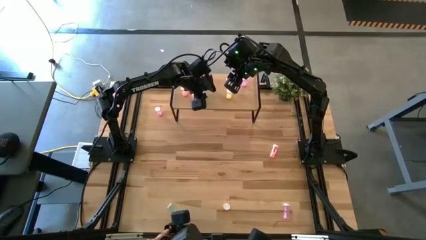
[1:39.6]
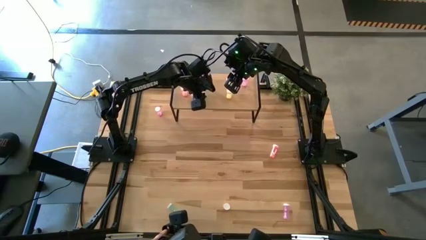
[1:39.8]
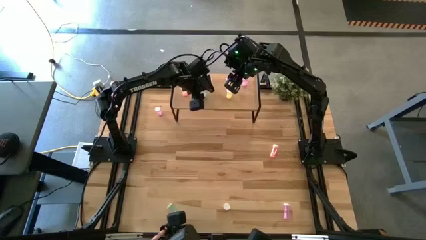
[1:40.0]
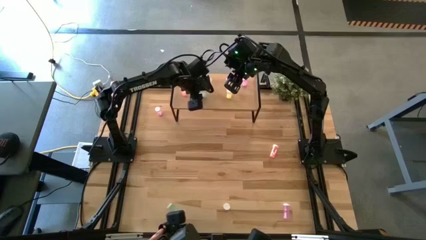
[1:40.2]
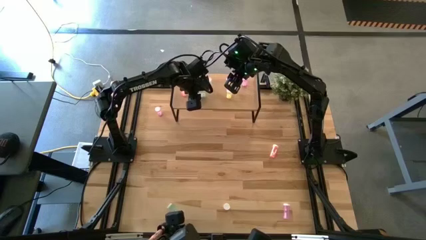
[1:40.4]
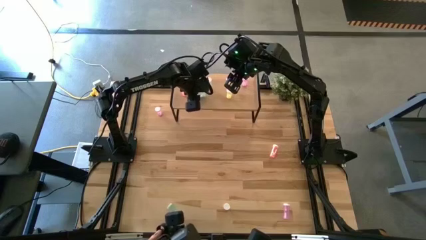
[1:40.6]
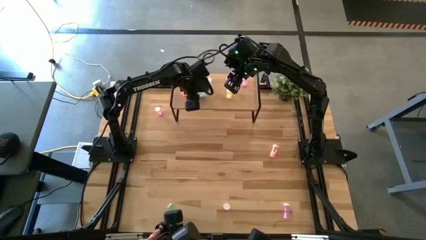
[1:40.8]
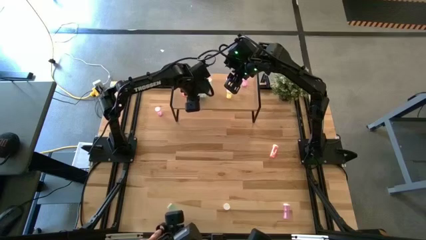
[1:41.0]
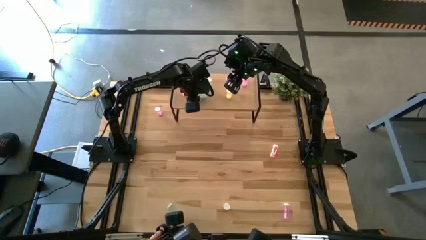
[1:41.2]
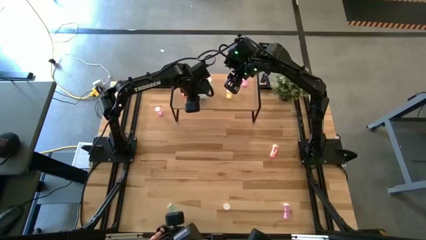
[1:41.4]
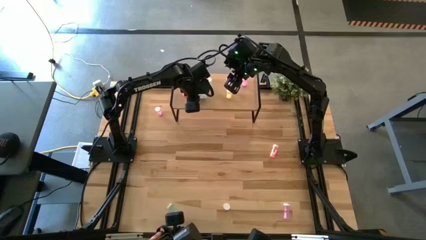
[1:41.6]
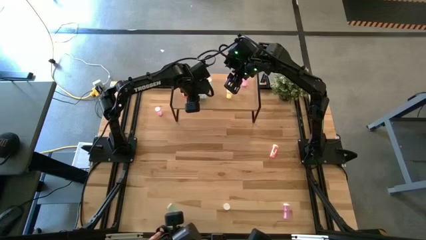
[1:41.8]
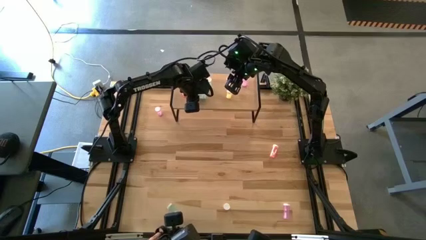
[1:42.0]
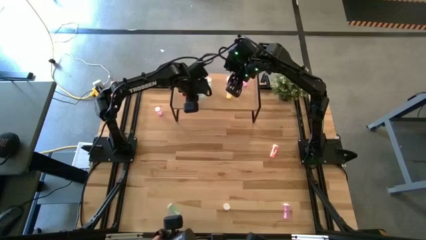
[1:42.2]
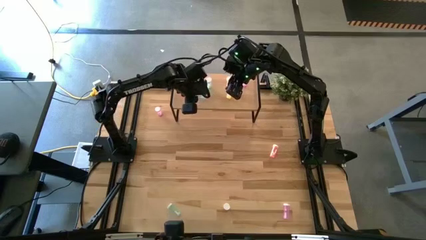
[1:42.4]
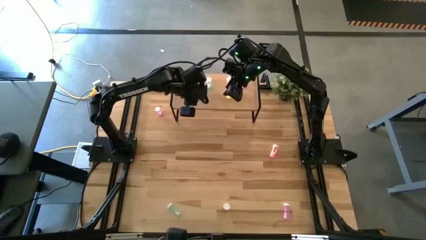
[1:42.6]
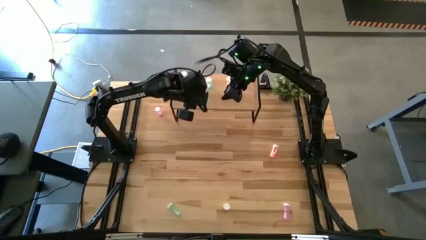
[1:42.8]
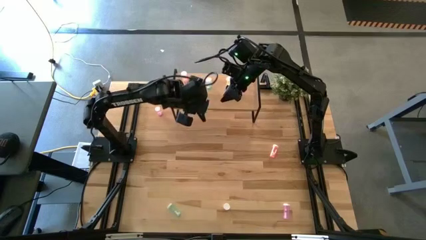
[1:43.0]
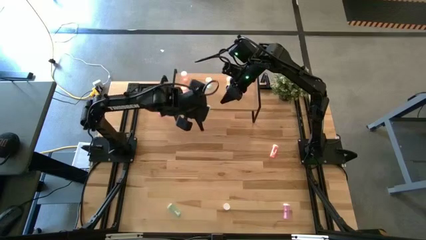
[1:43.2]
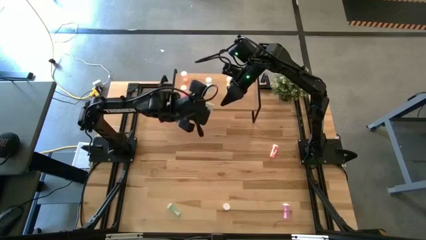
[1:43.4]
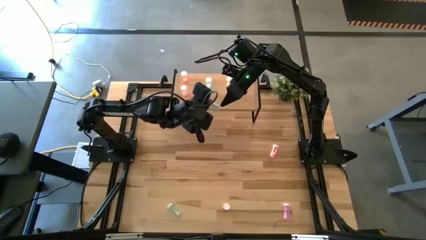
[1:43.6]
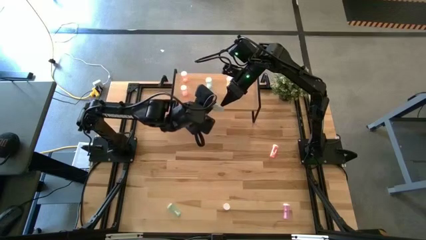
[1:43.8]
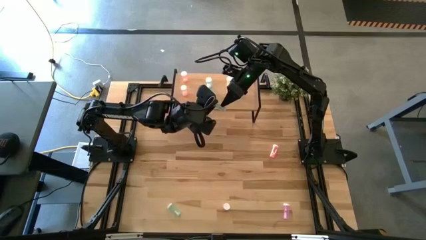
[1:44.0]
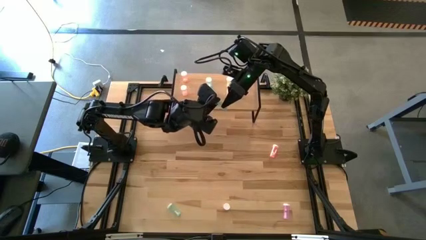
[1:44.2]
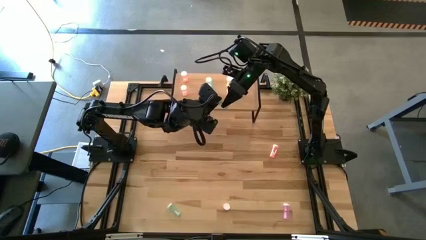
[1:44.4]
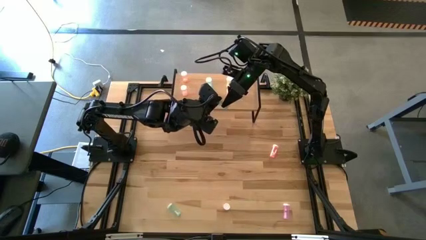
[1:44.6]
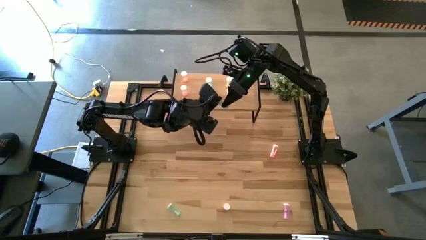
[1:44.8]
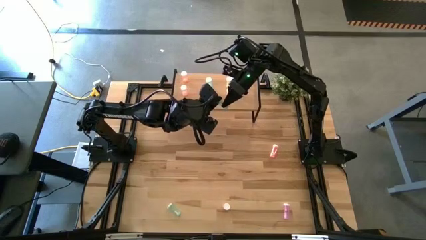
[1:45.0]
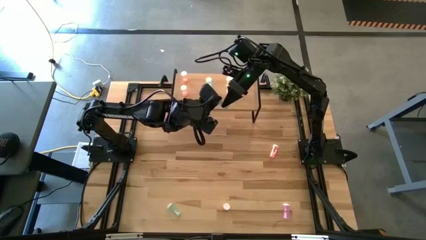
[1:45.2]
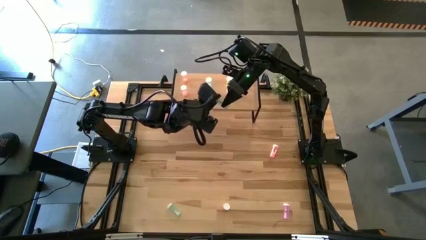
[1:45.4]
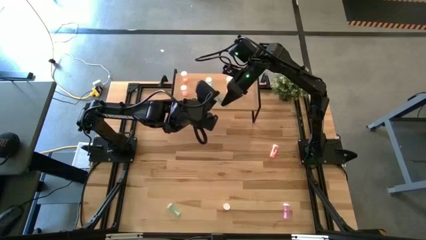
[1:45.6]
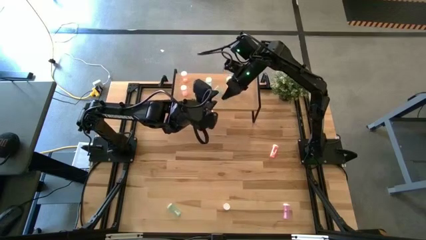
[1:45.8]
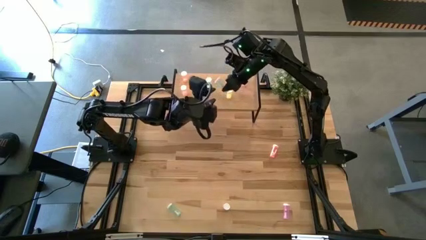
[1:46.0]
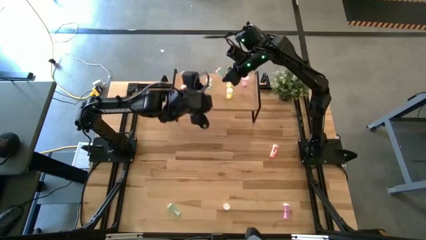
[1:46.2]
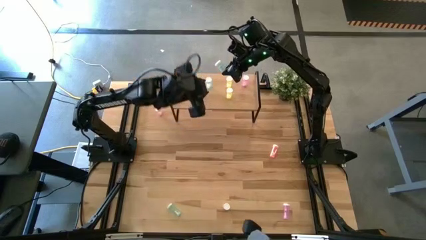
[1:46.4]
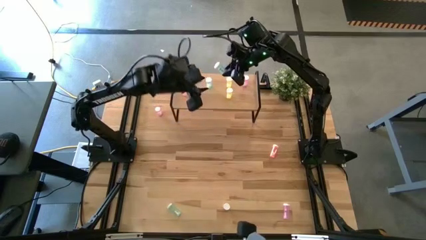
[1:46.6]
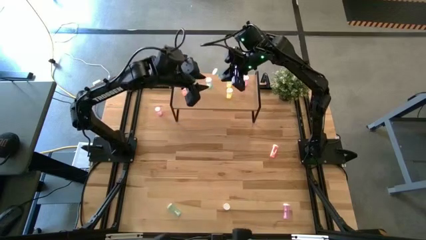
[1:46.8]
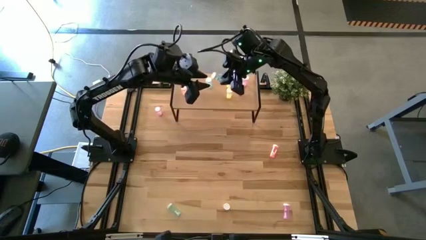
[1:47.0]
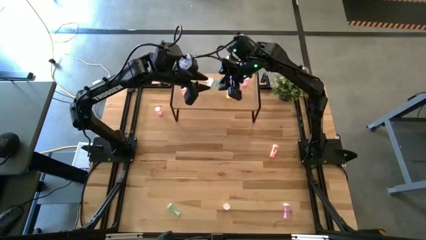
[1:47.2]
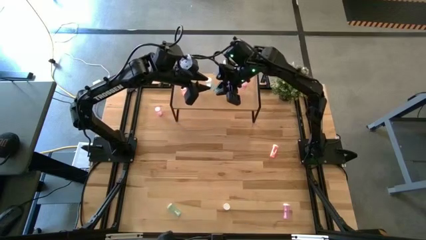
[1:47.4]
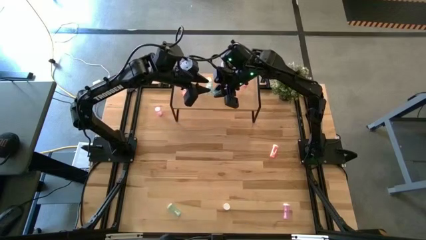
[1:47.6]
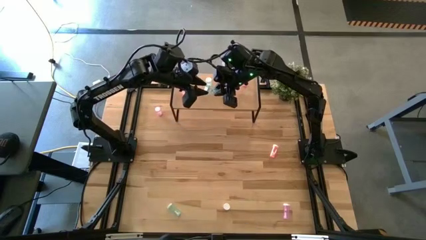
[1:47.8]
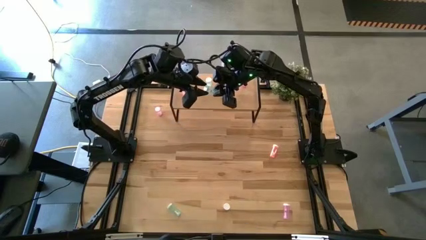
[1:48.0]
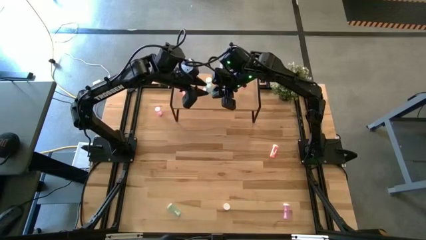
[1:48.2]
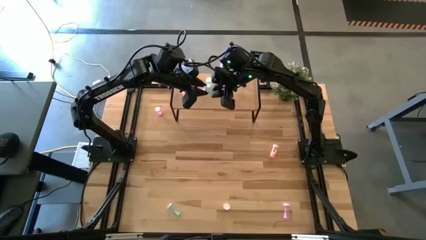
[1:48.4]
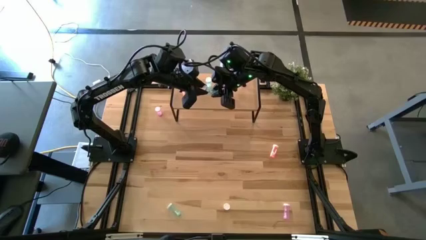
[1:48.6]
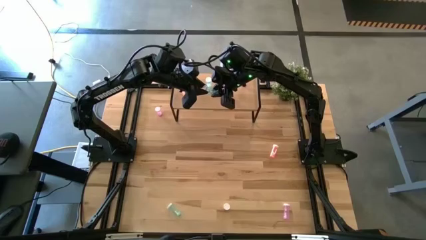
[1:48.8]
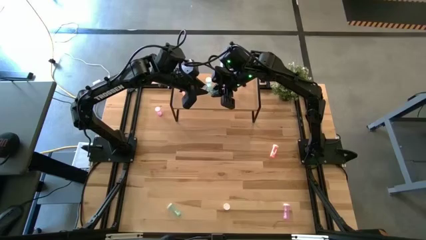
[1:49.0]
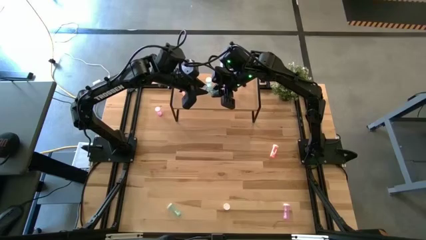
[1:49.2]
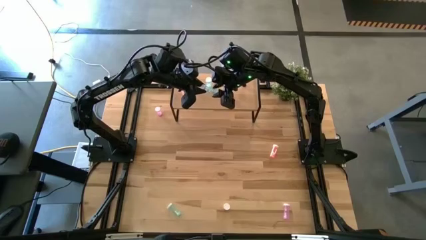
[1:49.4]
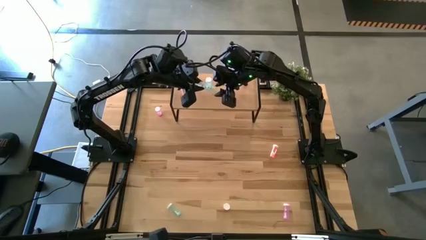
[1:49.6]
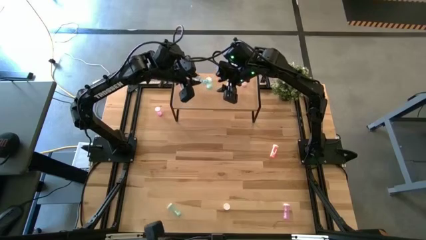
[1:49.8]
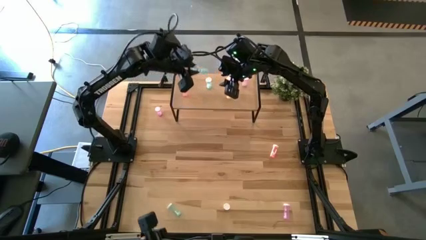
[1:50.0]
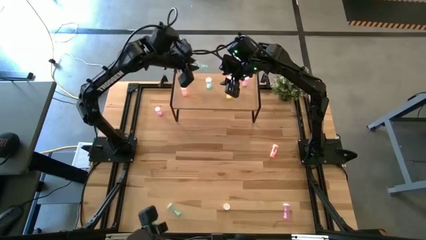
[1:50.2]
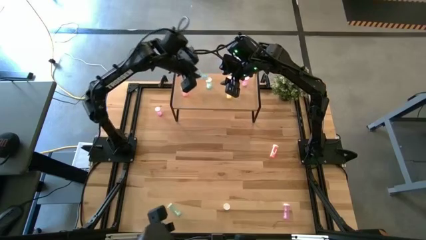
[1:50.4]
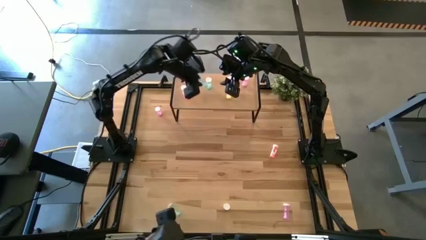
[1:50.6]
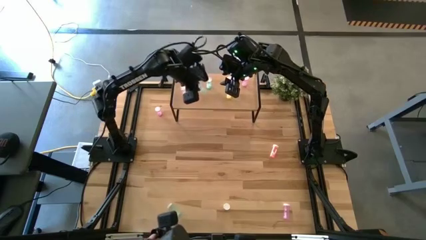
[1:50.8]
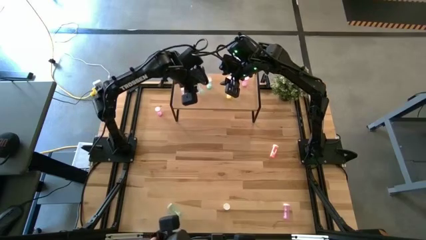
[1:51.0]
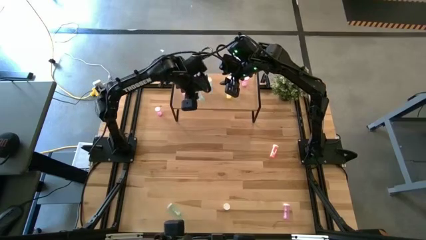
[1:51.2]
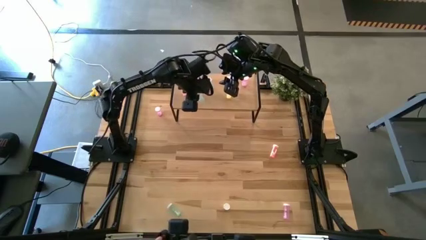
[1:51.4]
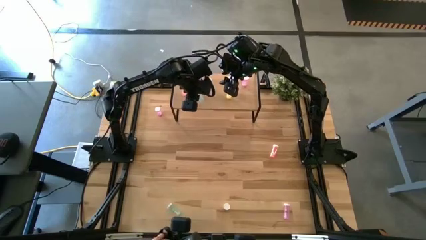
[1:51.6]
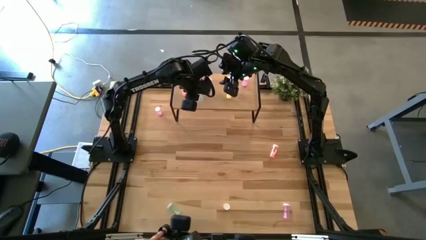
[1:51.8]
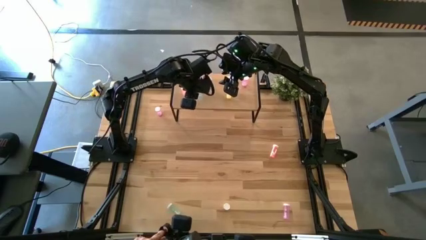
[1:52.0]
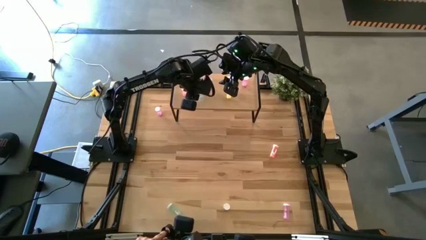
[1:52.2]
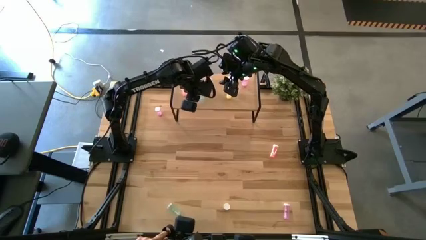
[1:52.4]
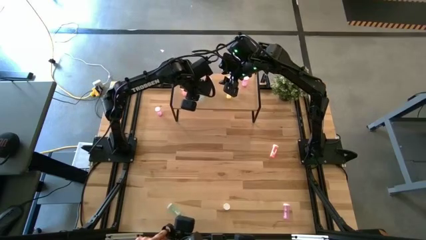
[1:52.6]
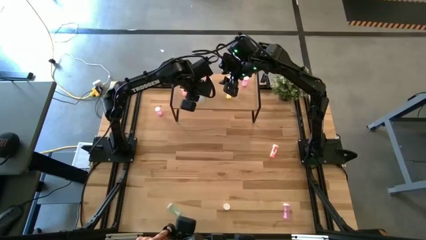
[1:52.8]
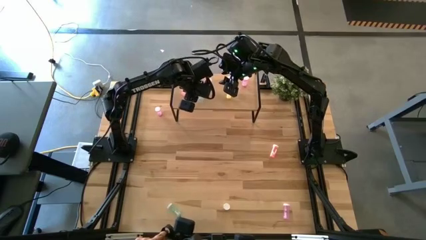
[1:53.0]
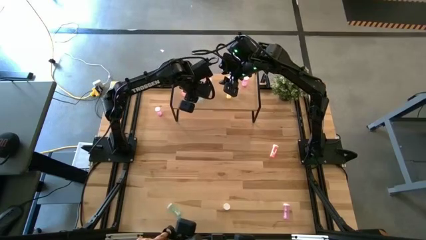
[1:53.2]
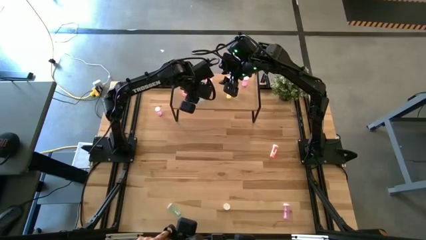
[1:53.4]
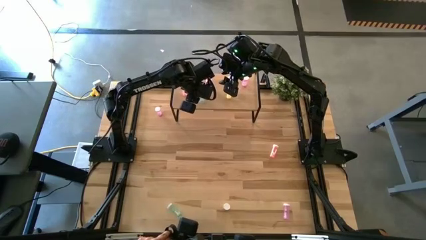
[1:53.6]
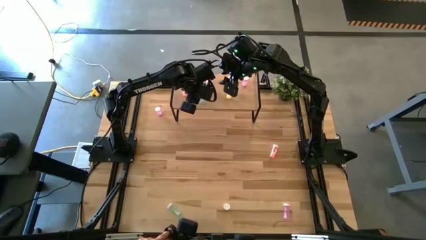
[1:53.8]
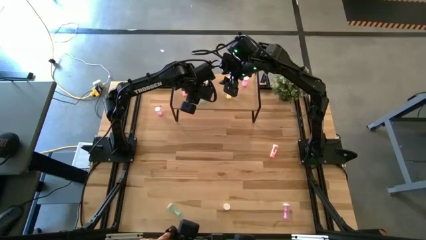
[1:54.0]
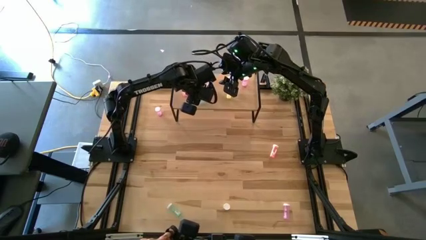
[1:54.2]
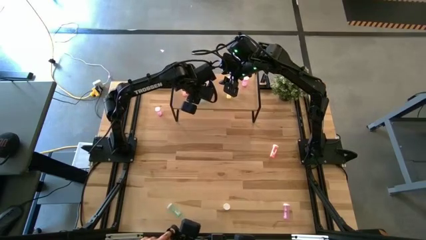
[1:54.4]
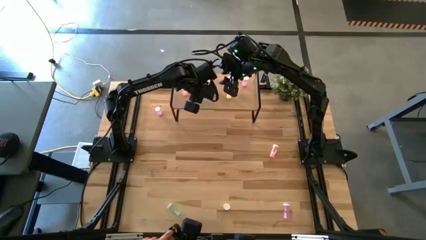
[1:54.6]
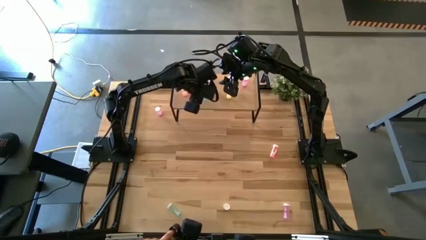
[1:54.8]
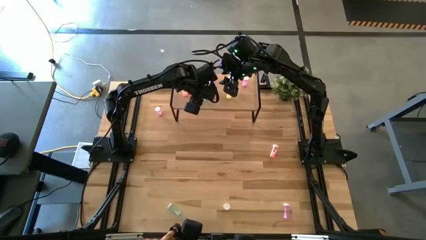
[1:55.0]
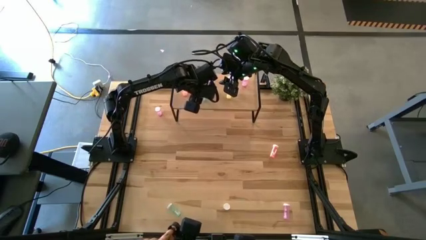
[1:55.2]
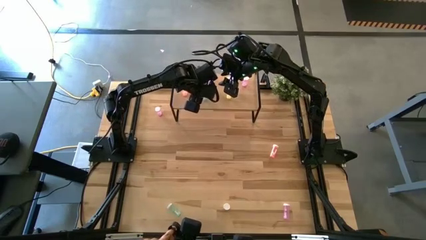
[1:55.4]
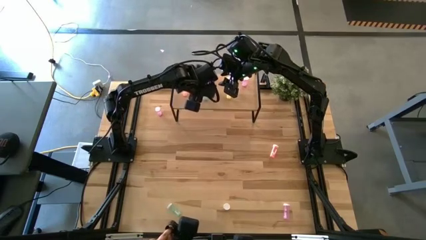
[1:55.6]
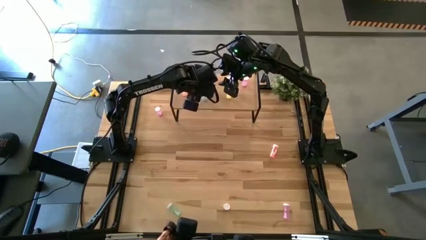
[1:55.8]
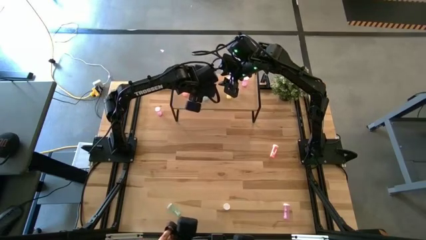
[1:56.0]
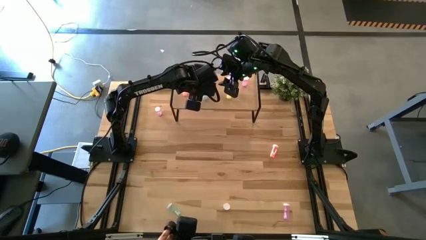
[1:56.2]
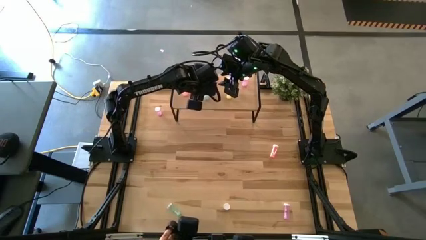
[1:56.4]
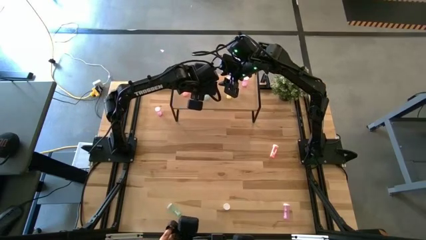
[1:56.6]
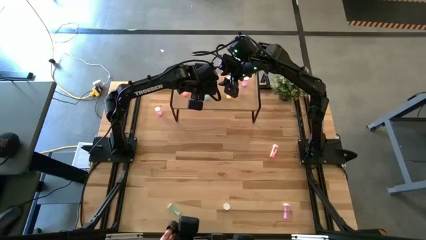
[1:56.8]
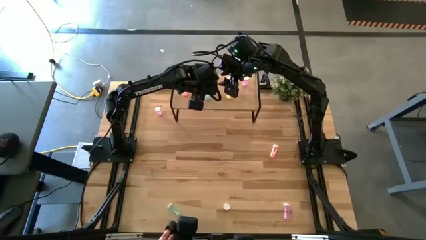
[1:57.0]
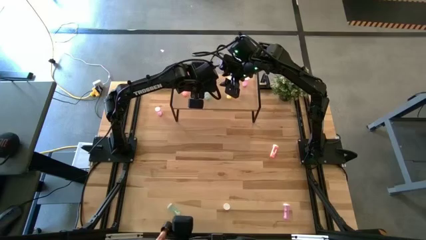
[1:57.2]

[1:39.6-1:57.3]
Task: Pick and place medicine bottles onto shelf by color
Put the right blue pill bottle on the shelf aligned with the other blue pill bottle
